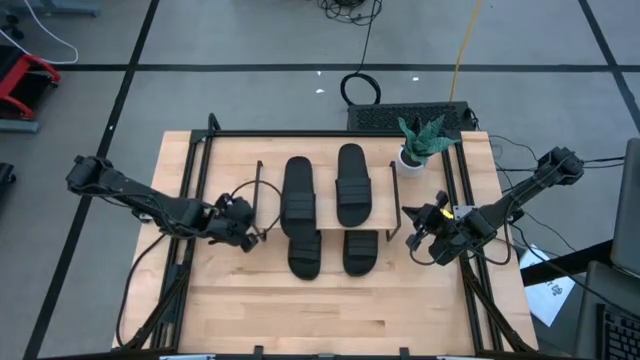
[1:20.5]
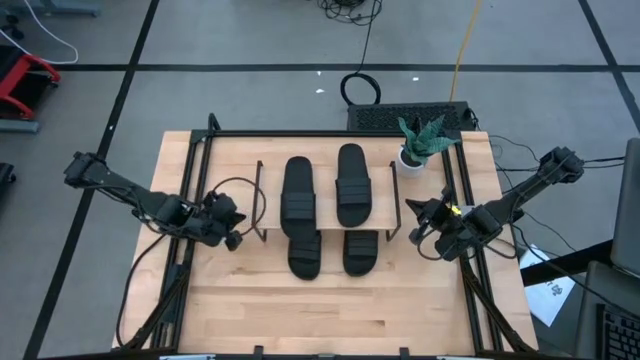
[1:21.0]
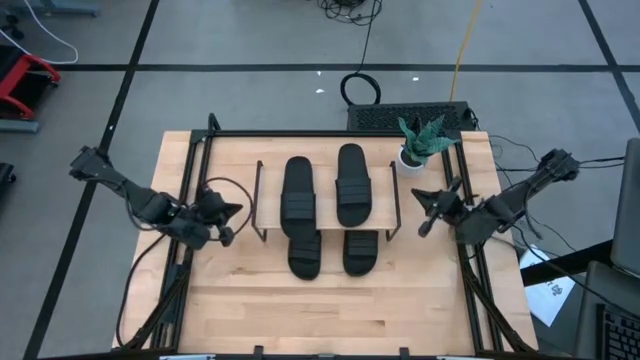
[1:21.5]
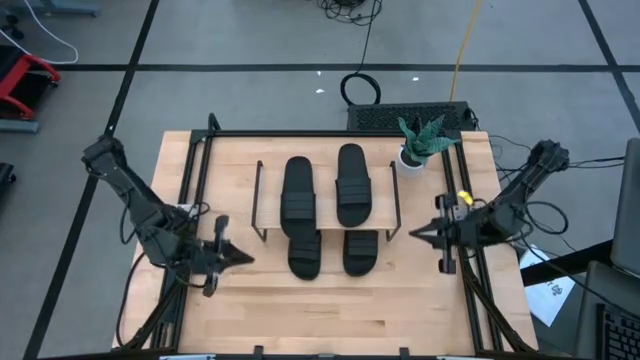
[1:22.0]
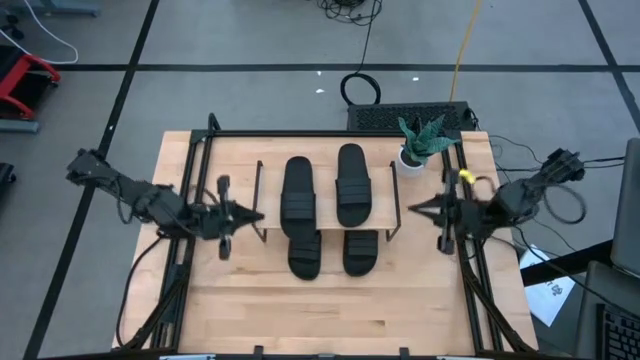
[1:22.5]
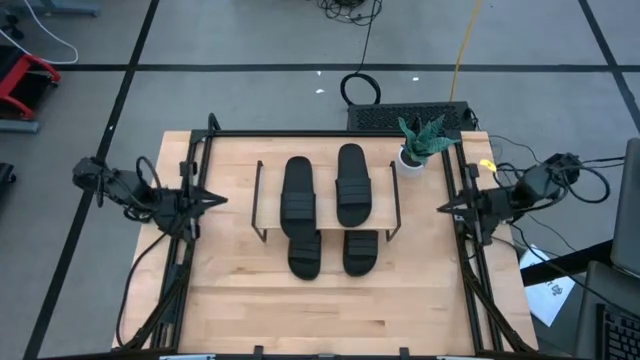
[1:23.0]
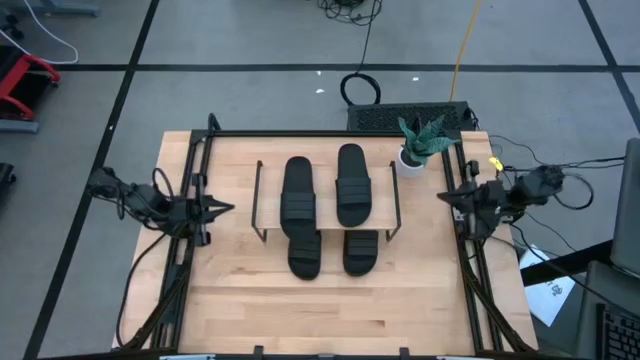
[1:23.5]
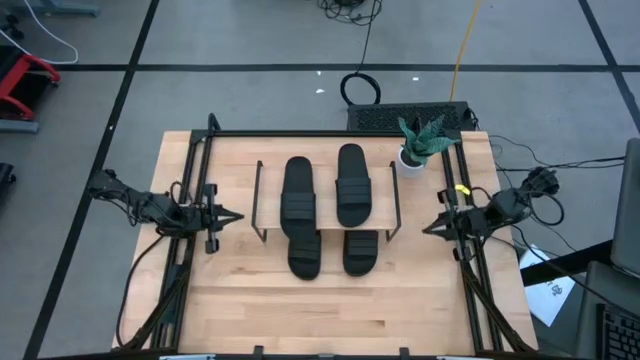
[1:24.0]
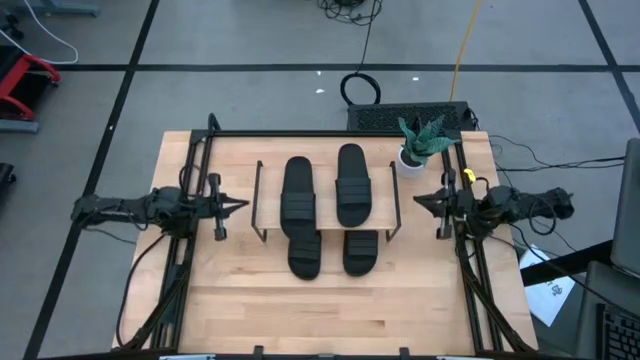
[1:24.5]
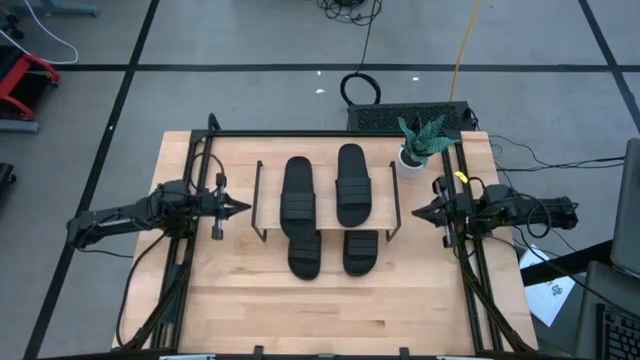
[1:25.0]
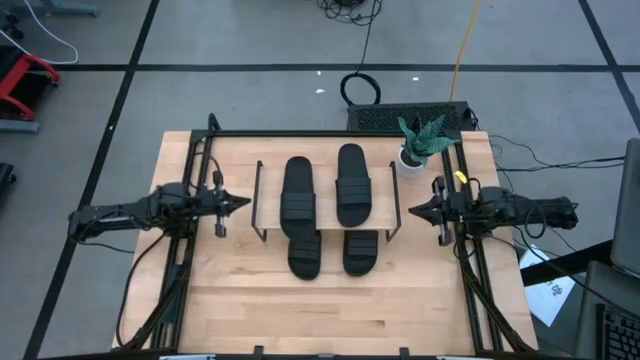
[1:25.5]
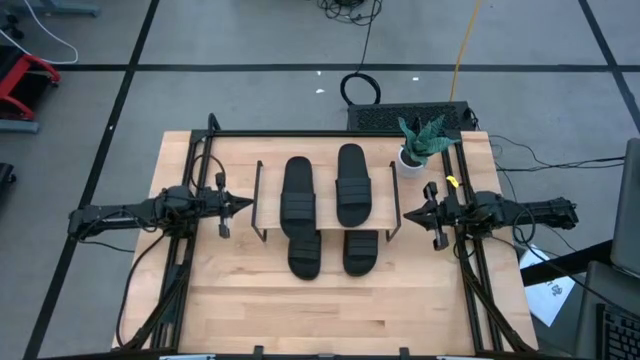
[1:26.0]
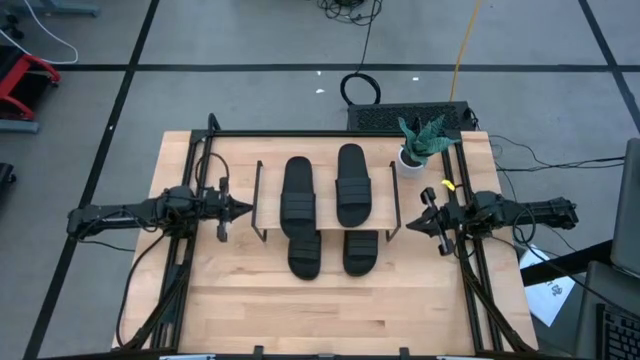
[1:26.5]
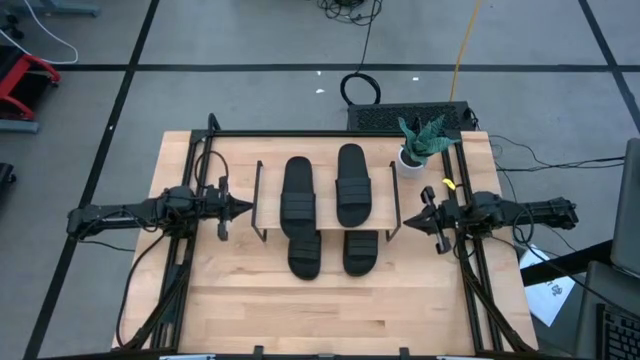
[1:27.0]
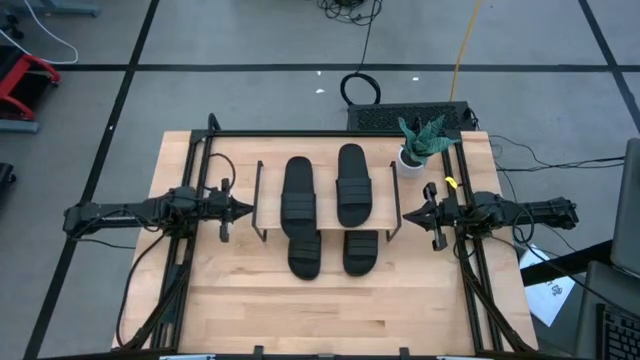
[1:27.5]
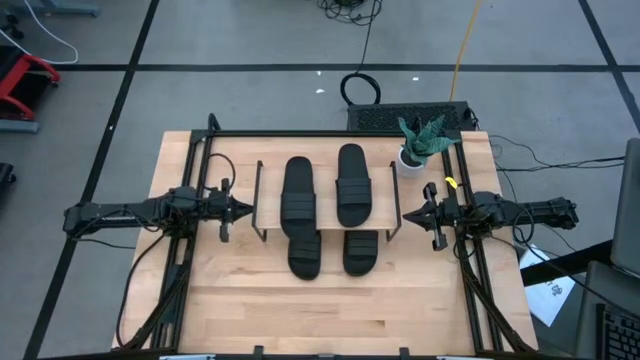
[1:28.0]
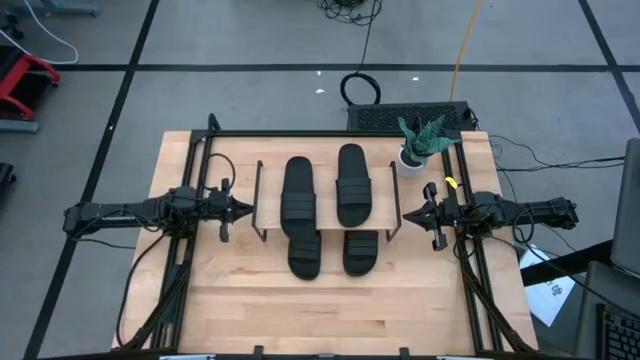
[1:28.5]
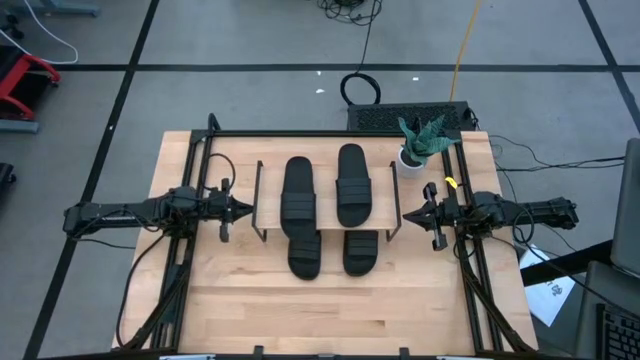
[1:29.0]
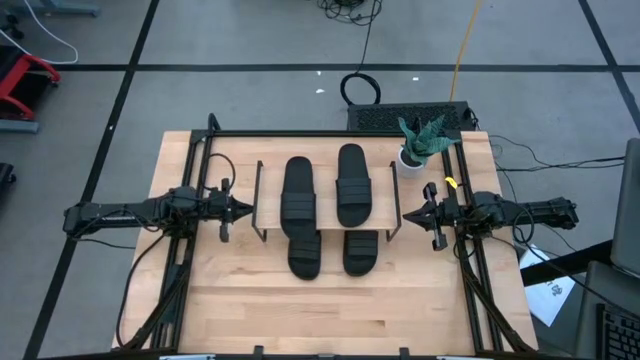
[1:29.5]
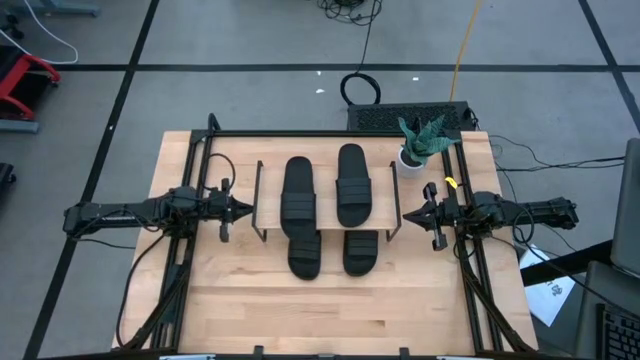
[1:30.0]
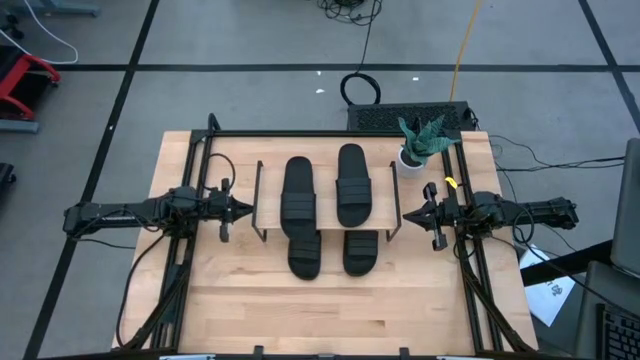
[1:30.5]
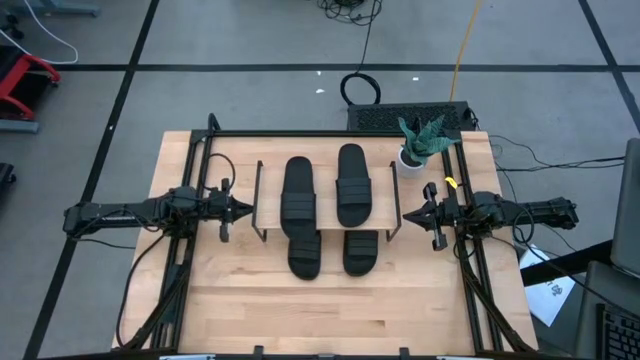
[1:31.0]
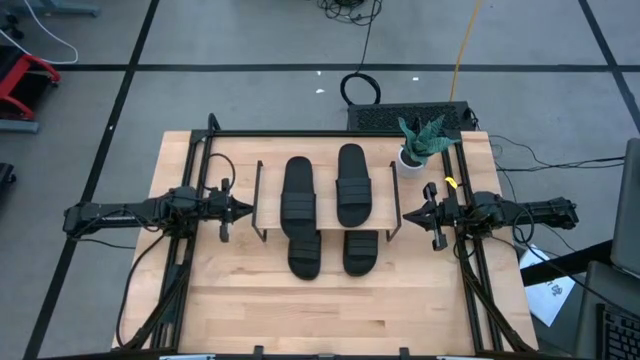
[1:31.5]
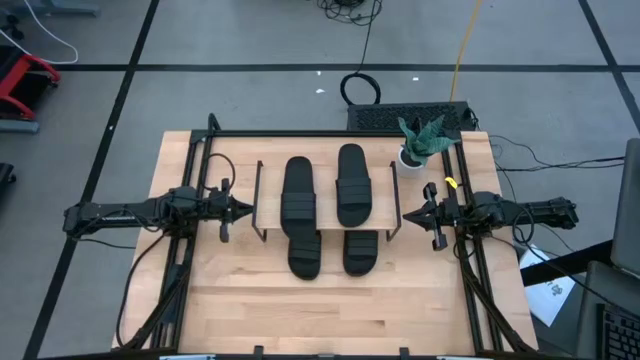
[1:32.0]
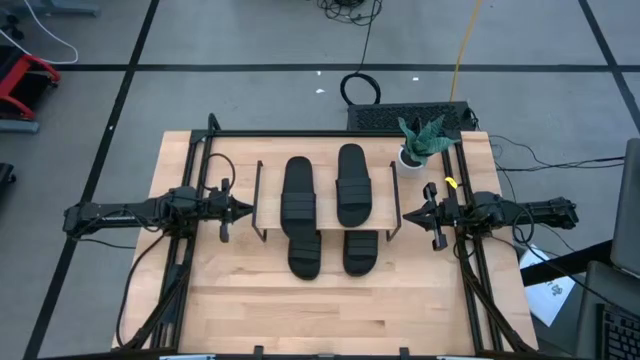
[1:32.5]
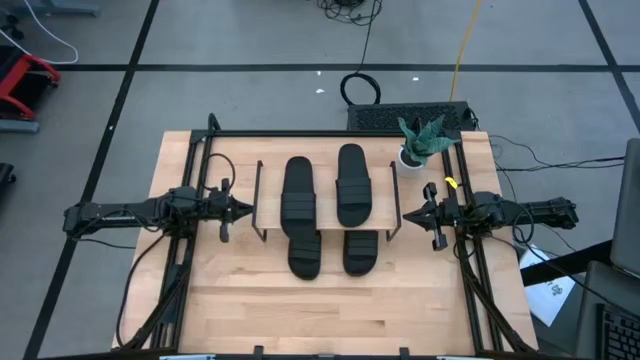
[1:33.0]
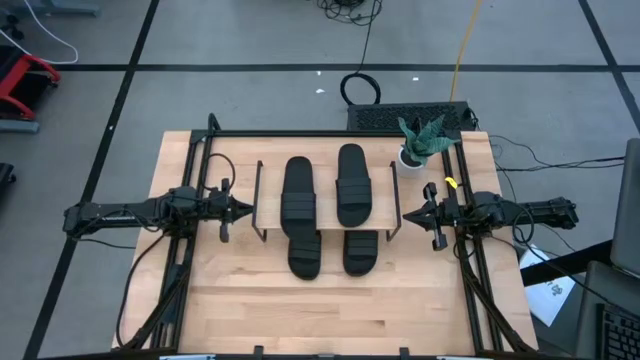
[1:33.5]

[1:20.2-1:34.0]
Task: Pick and place slides into the shelf
Return to Home Position

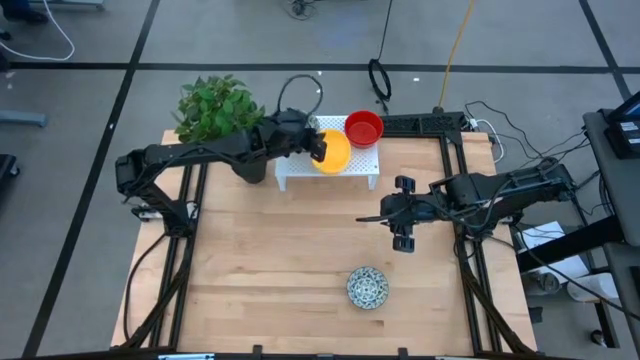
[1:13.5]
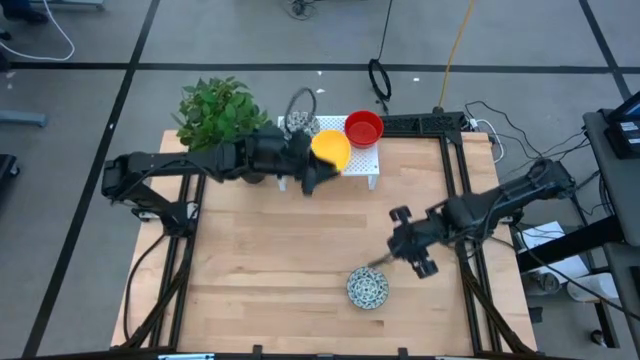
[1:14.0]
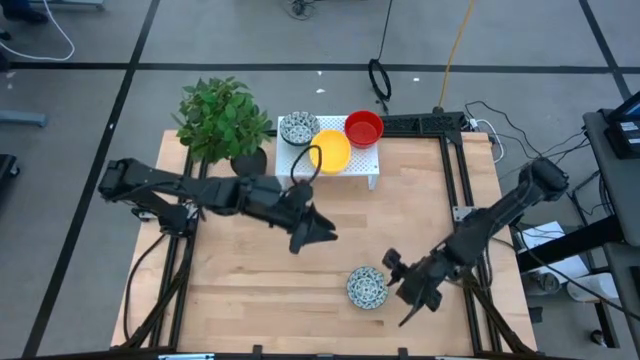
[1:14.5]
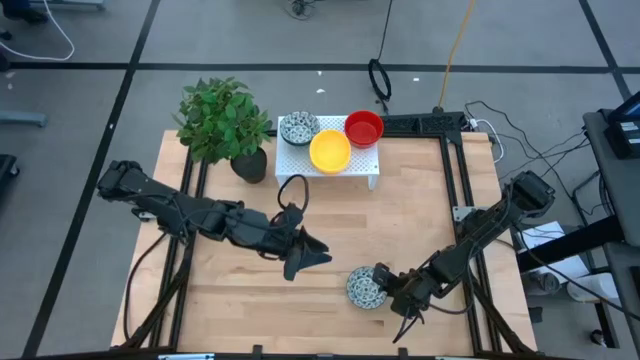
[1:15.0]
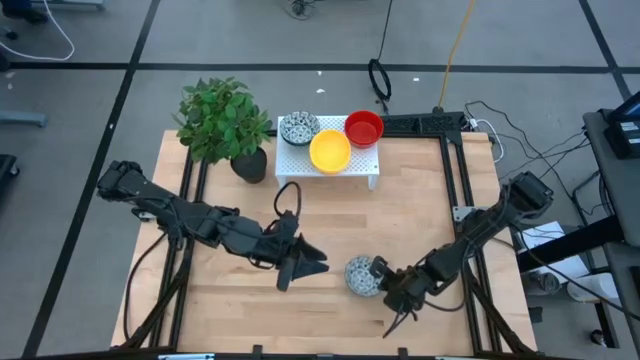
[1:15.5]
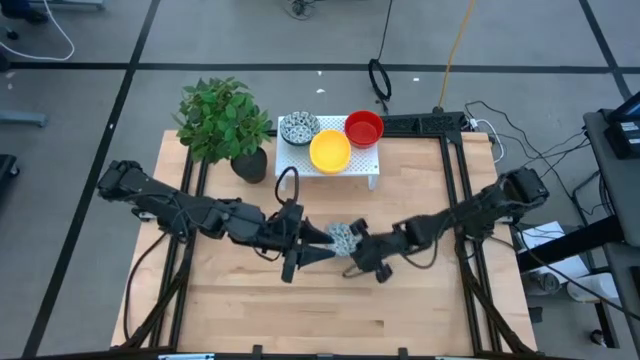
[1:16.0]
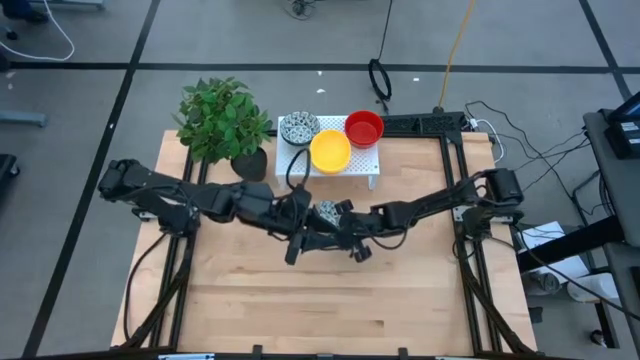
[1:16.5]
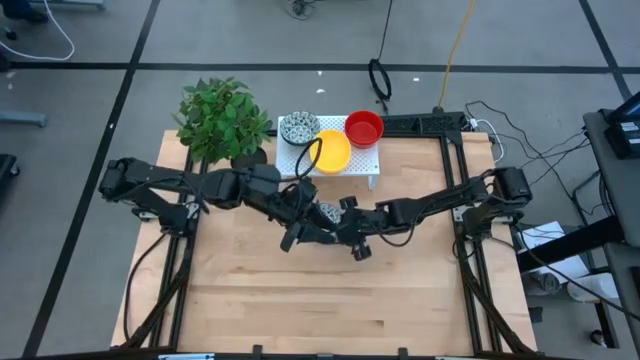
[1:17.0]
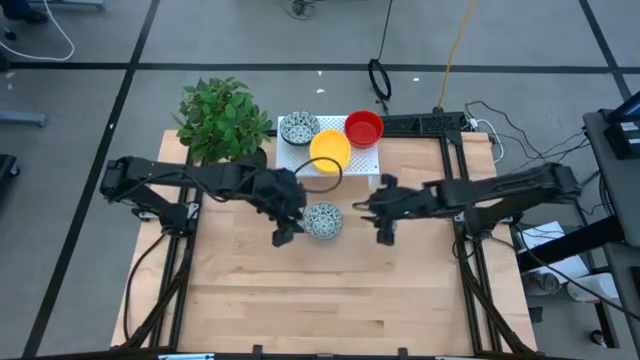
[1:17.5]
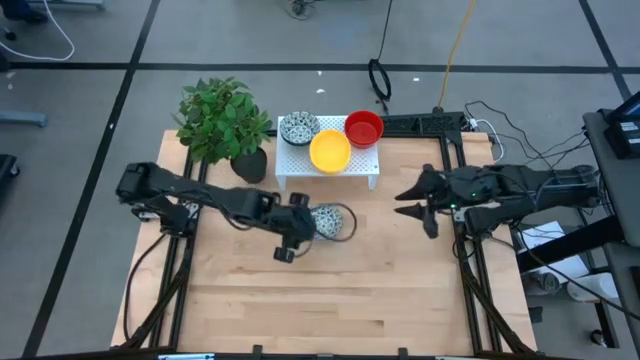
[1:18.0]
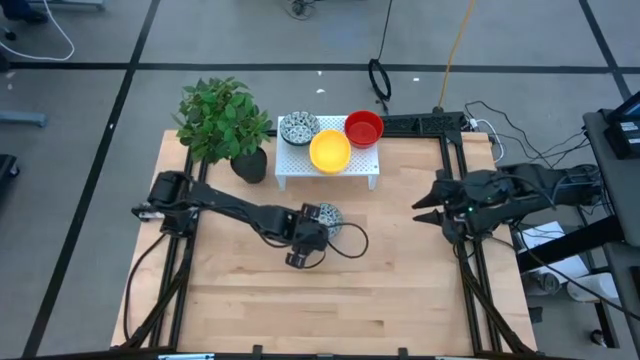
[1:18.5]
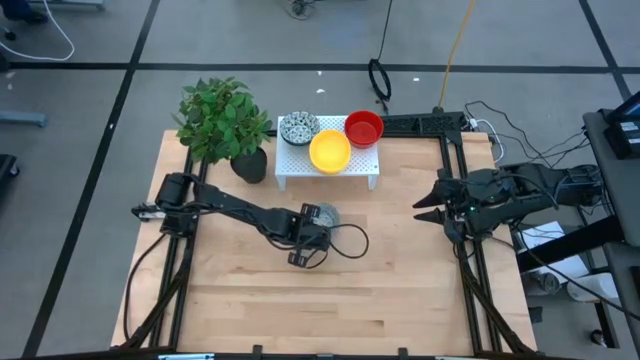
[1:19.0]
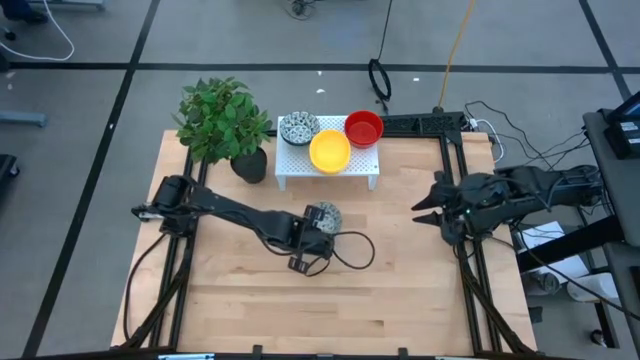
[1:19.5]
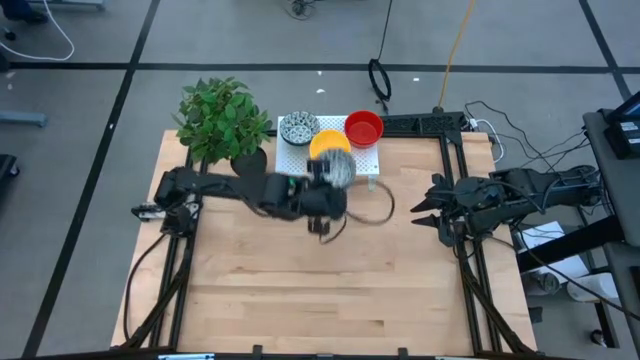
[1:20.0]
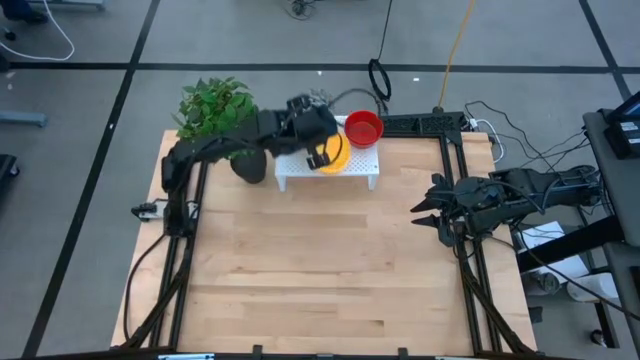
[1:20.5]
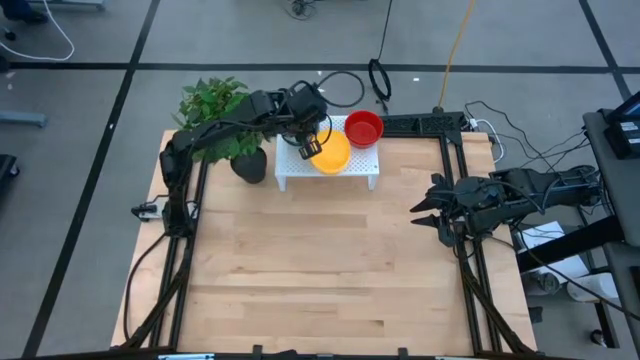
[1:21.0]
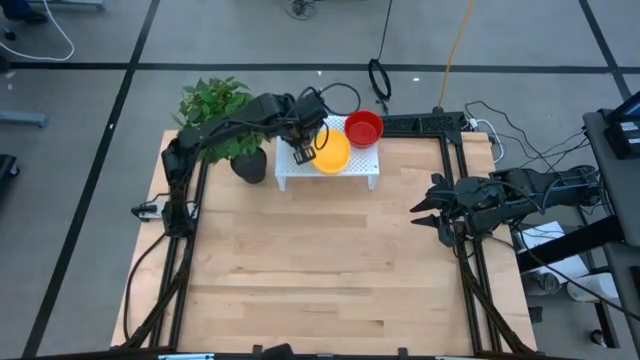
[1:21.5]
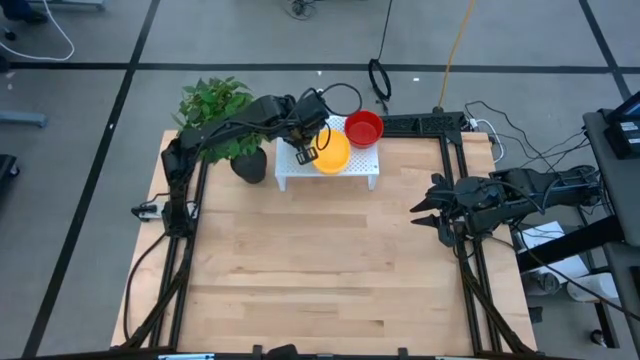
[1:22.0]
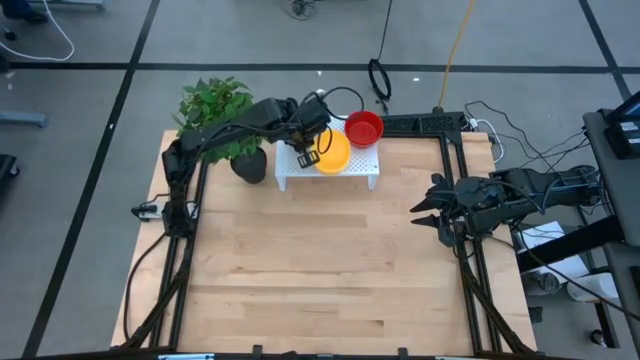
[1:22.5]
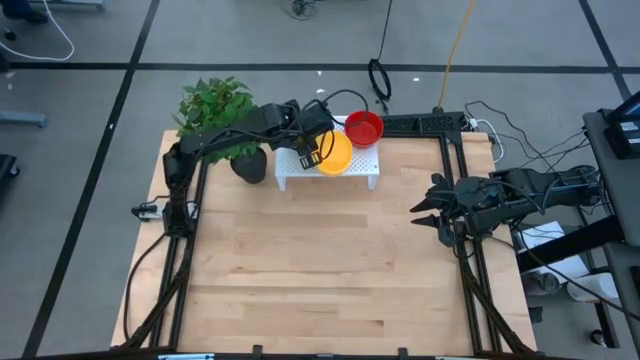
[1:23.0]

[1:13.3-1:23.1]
Task: Pick & Place Mini bowls
Stack the white patterned bowl on top of the white patterned bowl on the shelf
